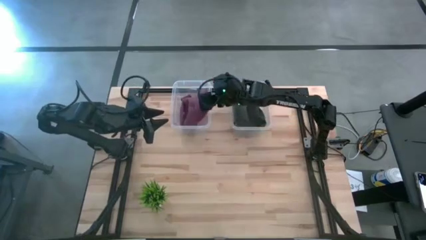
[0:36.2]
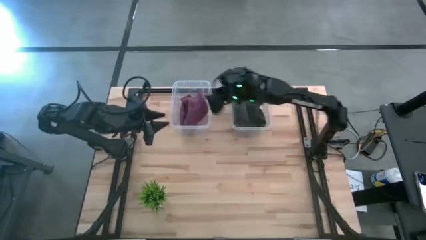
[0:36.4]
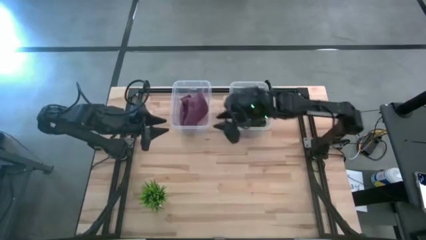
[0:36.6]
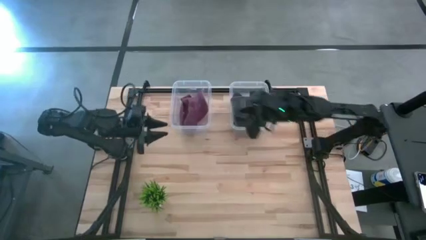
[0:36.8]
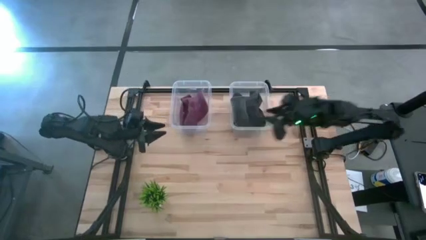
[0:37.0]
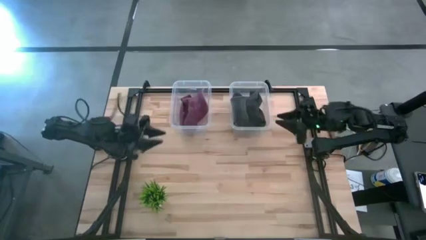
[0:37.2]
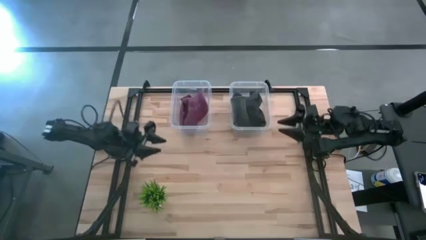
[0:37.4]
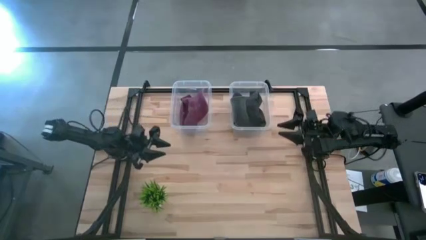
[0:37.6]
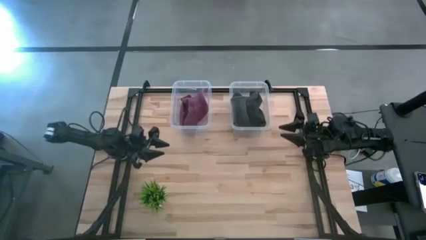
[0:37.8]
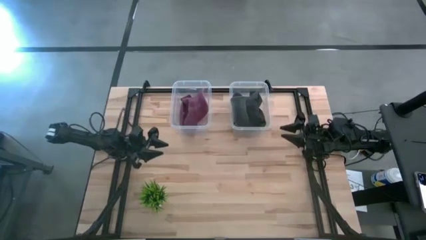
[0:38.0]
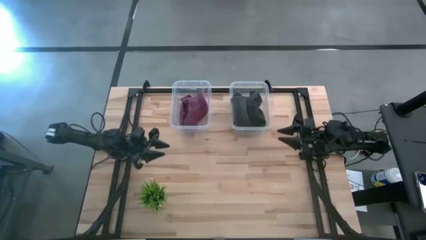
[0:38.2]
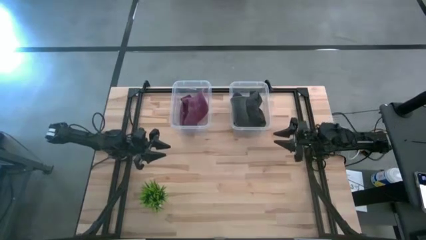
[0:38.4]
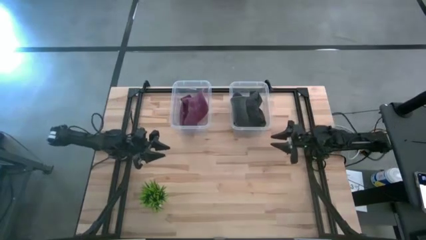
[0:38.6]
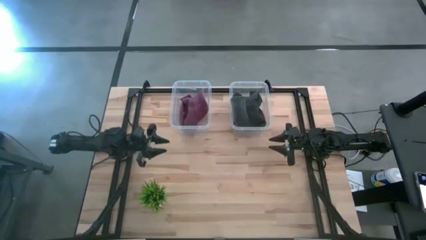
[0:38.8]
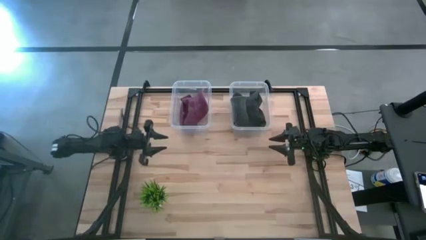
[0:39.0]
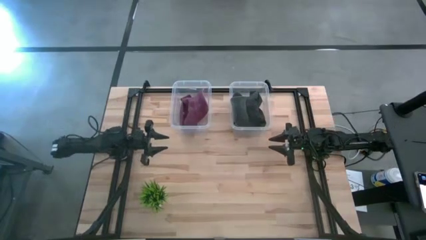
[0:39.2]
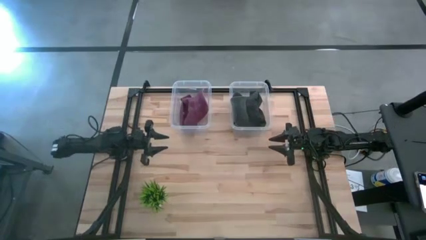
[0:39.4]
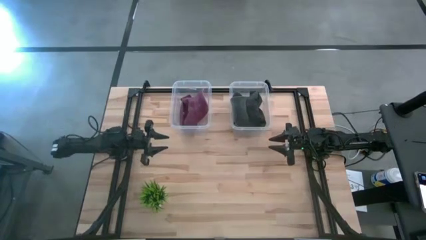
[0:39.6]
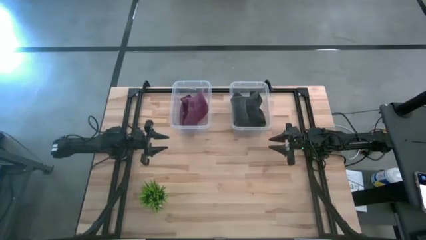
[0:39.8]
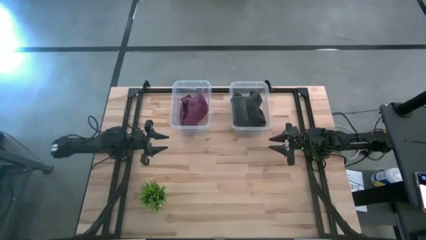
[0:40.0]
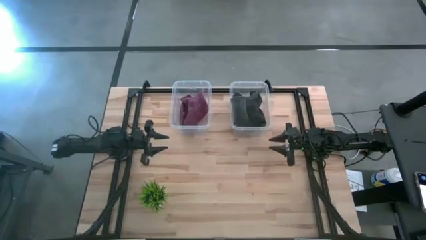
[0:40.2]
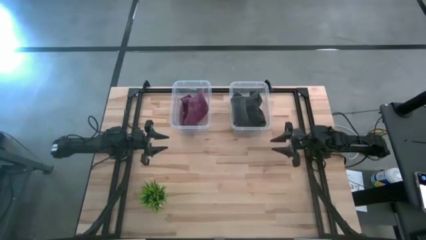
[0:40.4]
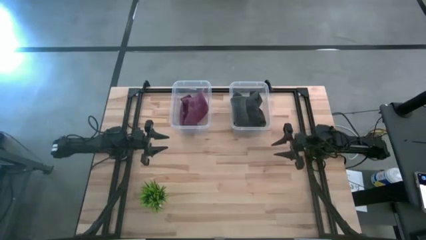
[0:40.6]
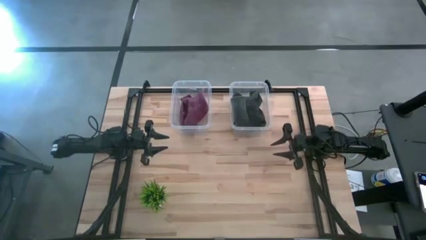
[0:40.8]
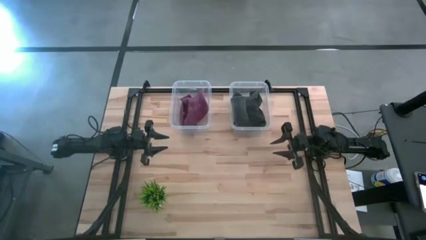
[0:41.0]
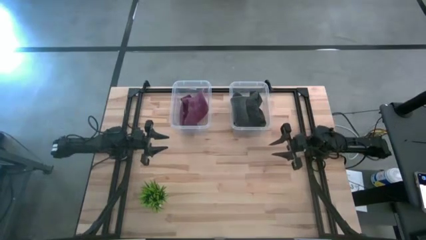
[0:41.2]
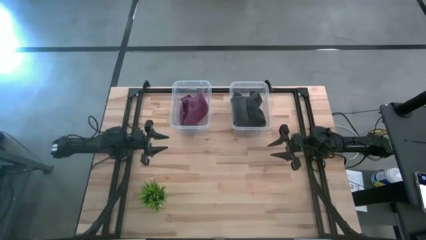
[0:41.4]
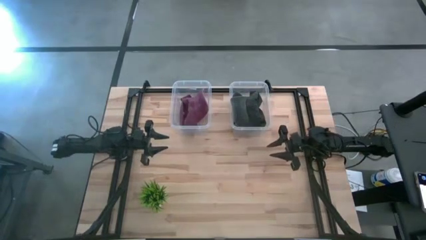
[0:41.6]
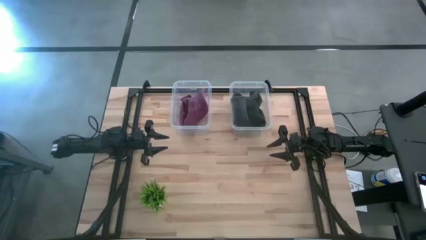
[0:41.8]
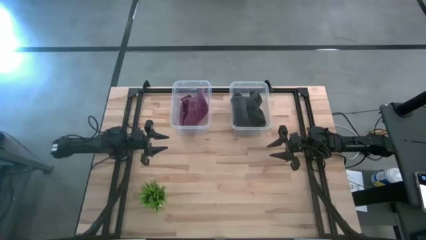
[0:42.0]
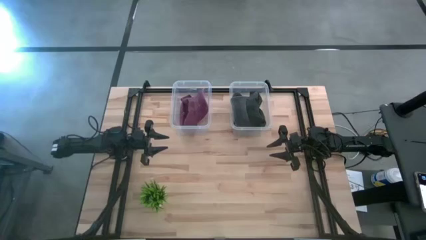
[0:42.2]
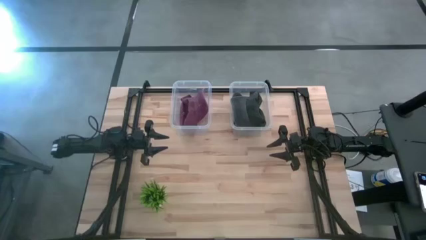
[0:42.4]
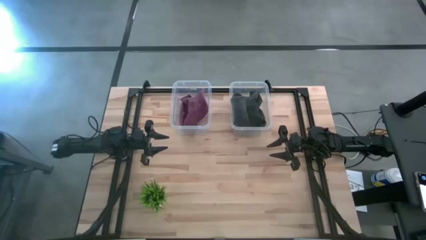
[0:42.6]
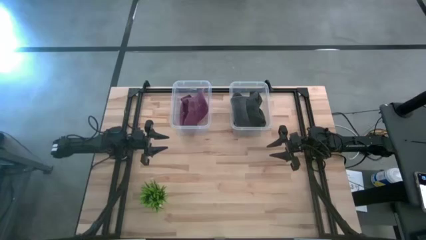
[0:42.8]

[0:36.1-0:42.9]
Task: Pick & Place hat
Return to Home Position

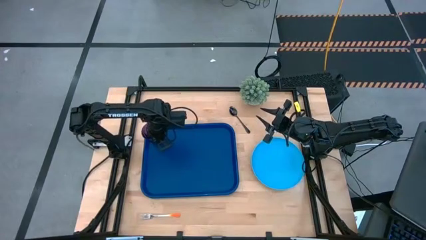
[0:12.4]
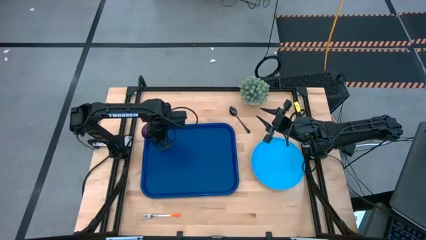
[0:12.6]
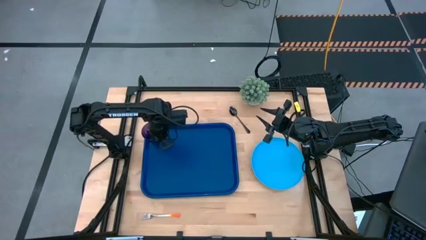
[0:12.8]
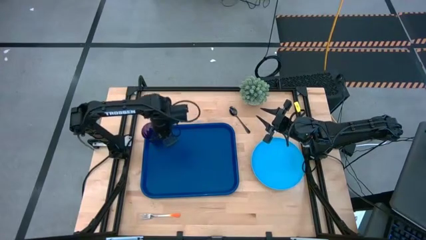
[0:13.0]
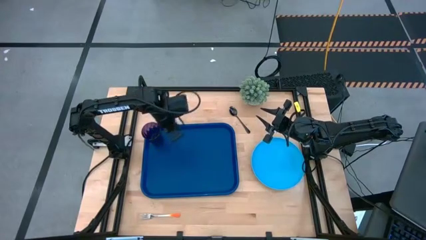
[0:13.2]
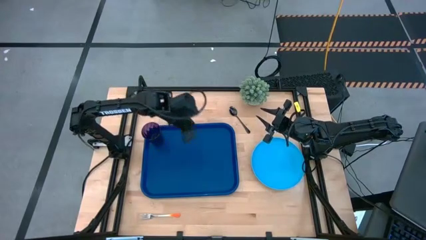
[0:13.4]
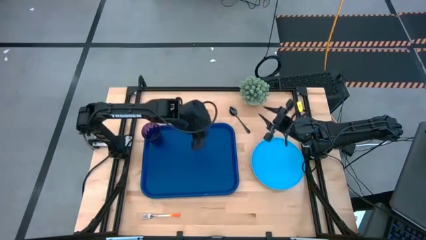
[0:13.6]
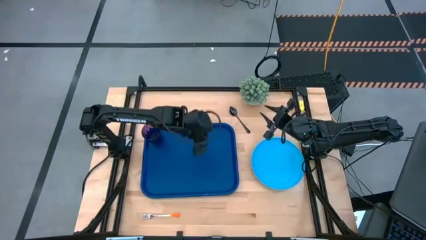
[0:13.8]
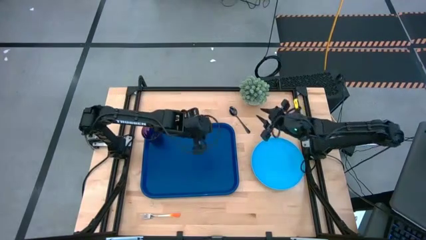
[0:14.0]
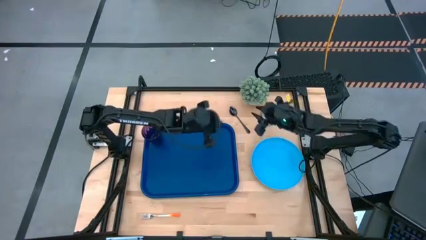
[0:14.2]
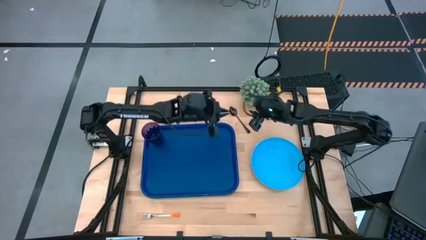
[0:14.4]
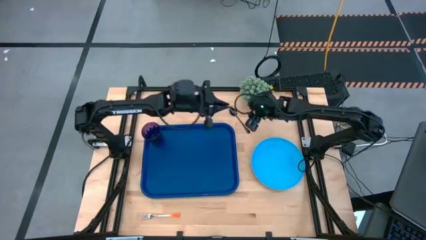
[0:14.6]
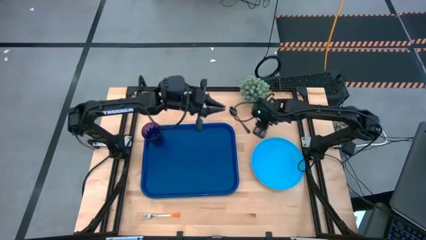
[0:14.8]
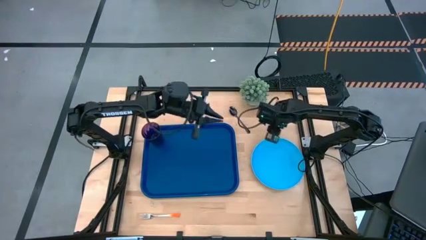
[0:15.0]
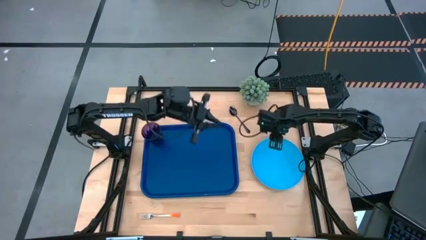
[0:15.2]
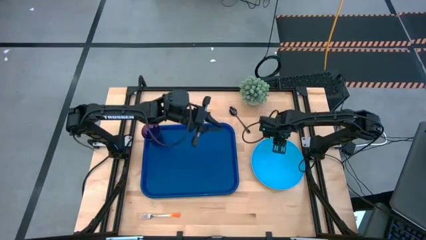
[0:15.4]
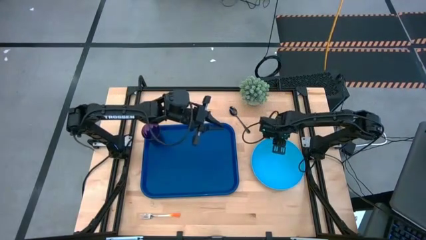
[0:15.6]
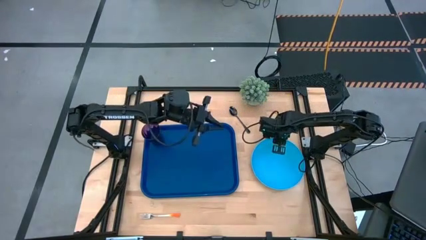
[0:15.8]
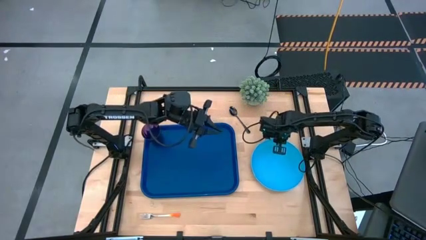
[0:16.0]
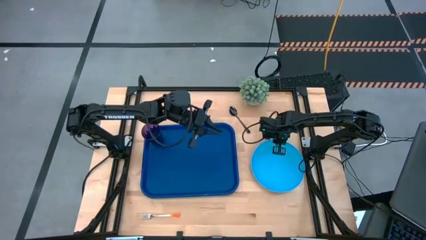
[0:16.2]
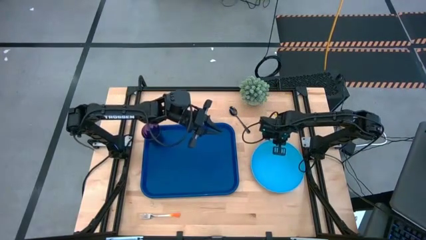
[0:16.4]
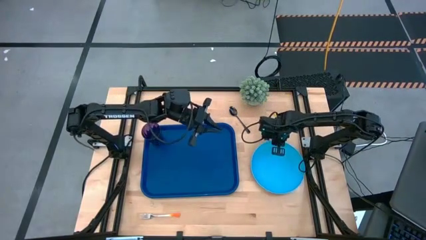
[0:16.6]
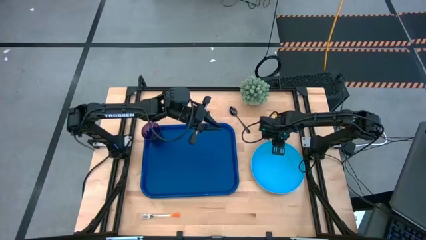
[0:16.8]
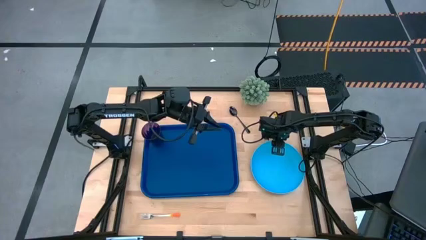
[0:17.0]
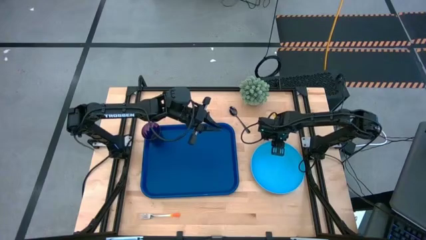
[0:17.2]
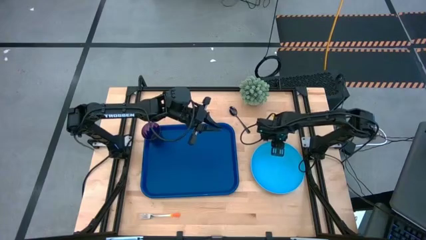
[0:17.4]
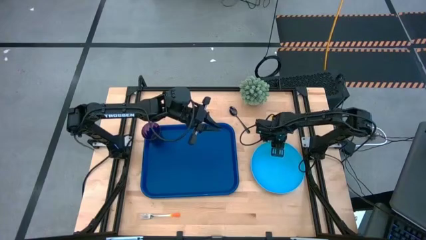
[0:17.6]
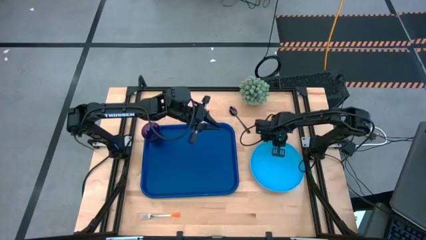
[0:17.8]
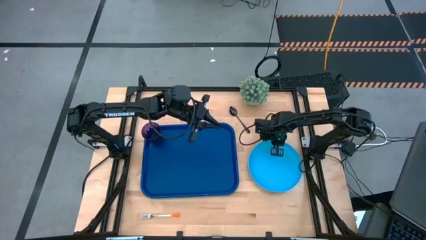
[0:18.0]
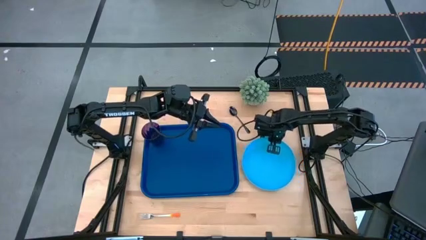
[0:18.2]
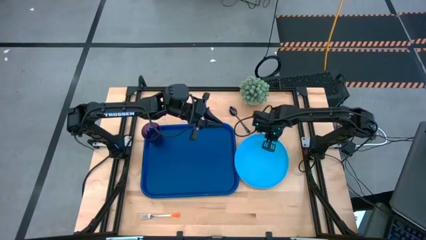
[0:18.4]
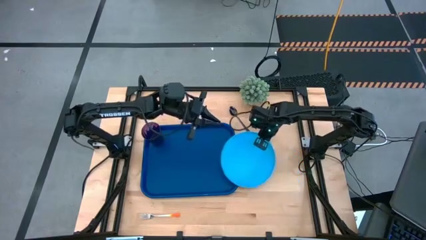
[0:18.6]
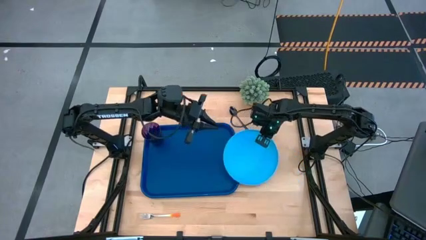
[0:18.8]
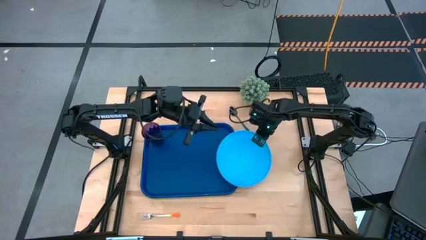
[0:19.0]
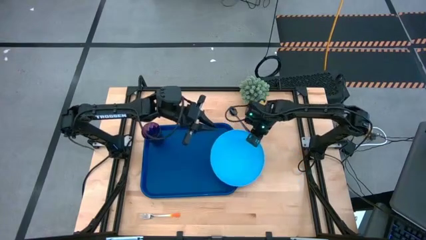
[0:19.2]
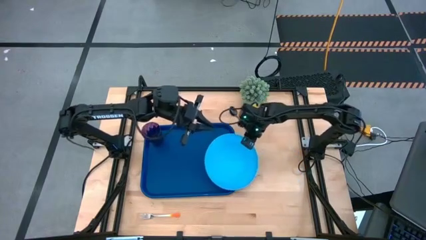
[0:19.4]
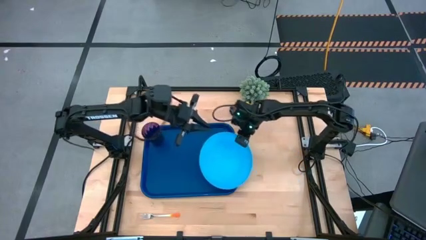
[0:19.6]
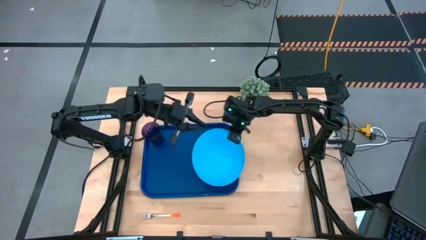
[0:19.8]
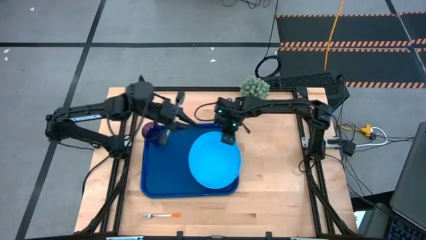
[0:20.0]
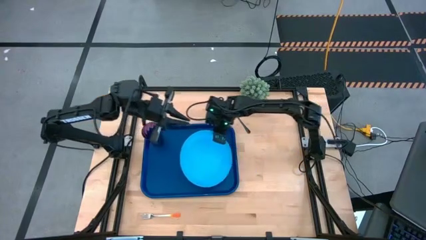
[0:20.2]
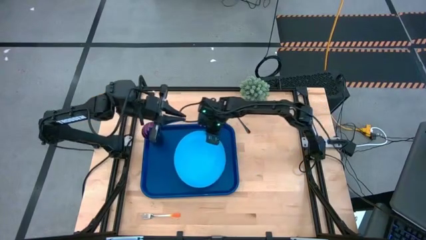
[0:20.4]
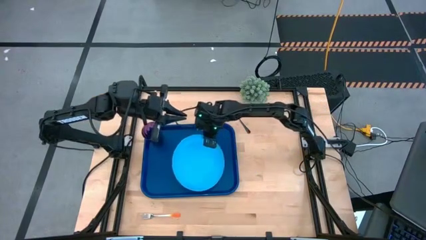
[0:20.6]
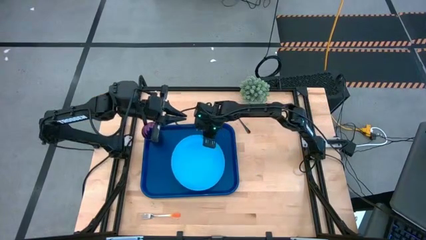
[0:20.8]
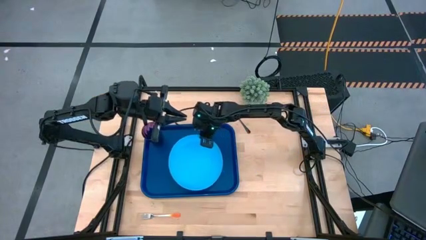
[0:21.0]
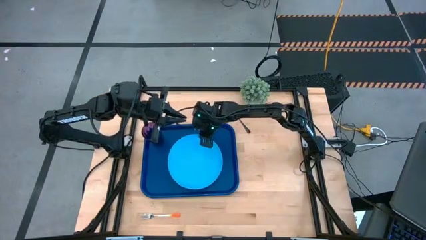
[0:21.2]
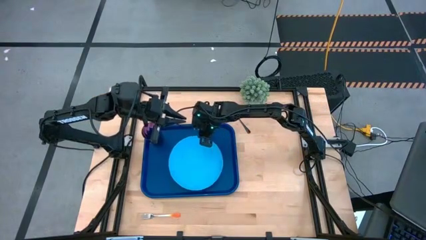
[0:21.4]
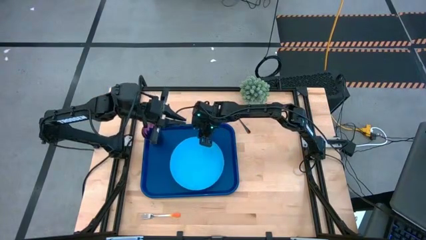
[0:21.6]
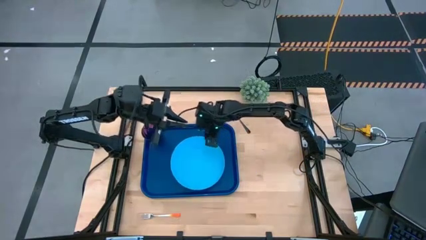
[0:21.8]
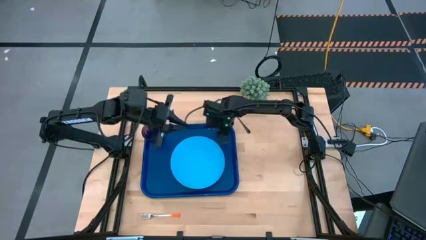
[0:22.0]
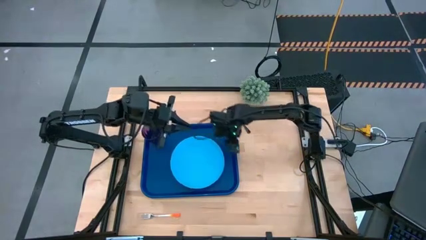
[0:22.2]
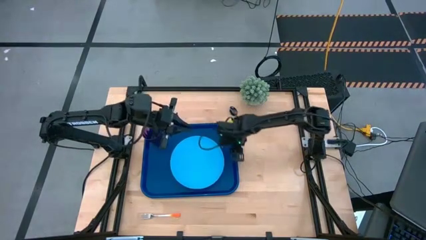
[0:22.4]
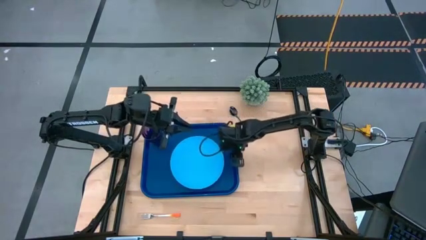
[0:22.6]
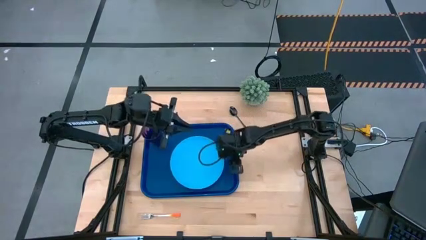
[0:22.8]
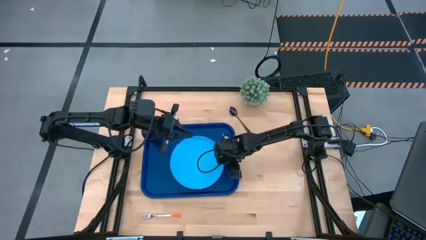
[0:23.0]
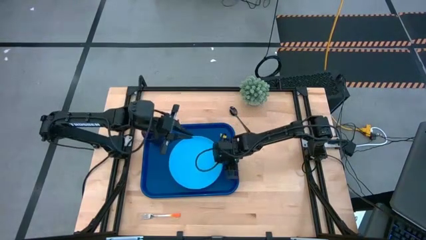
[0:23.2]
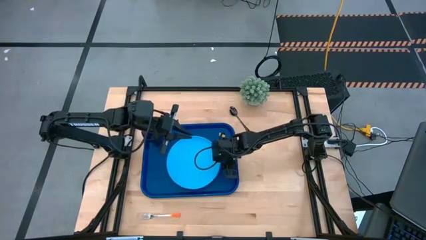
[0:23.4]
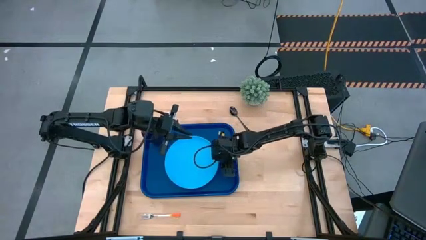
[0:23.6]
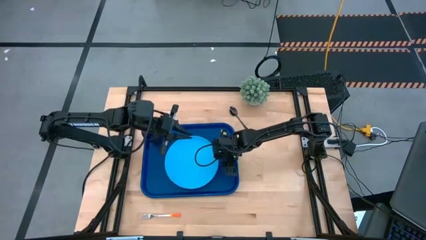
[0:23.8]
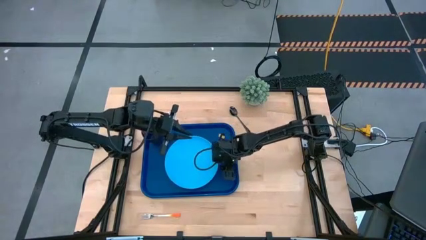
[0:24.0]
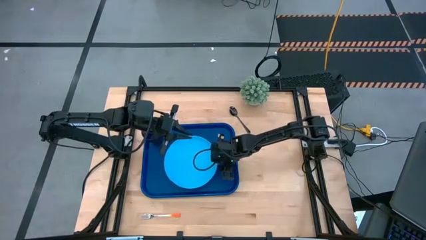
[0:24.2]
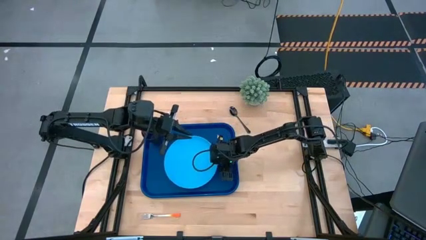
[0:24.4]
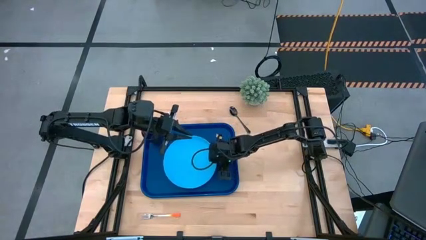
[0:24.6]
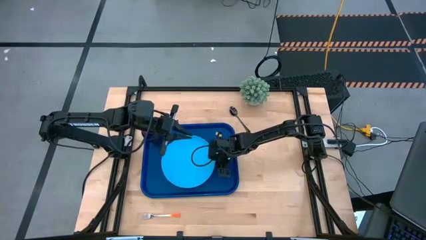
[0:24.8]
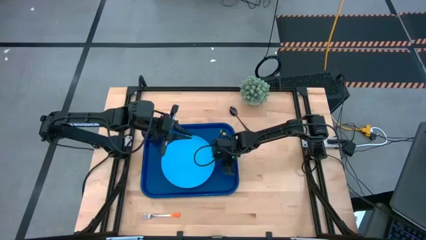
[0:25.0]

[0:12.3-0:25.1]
Task: Pick and place plate/cup/fork/spoon on tray
Put the light blue plate on the center of the dark blue tray
